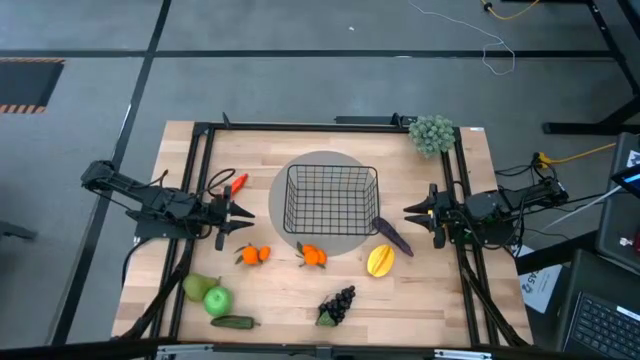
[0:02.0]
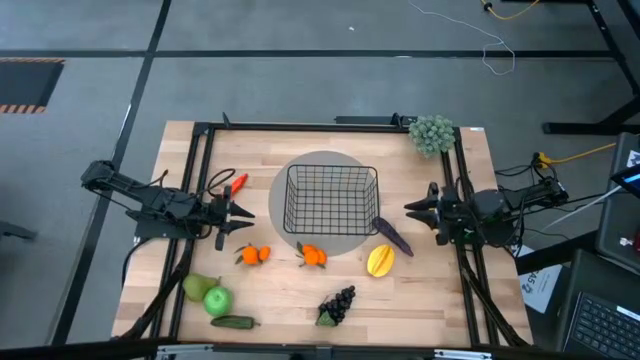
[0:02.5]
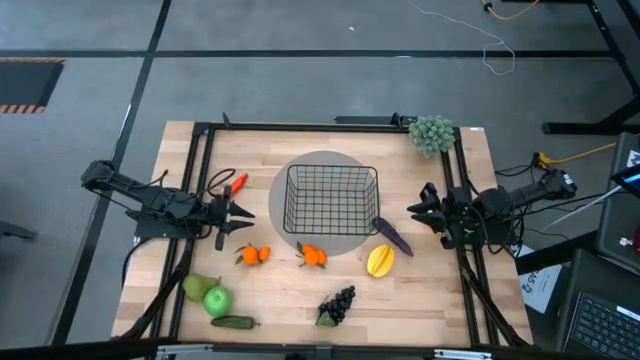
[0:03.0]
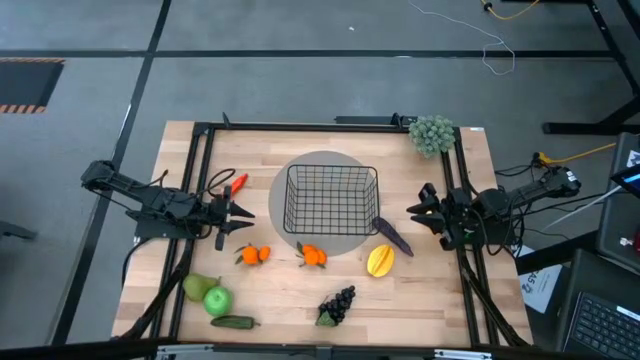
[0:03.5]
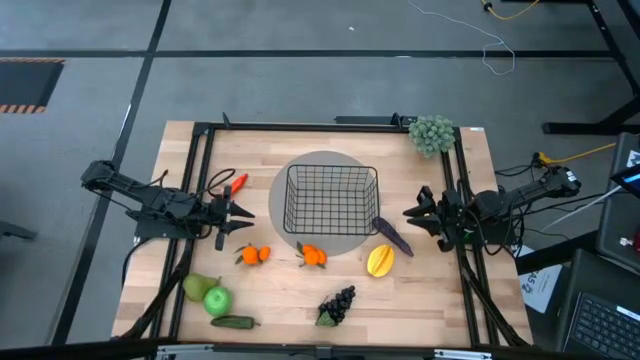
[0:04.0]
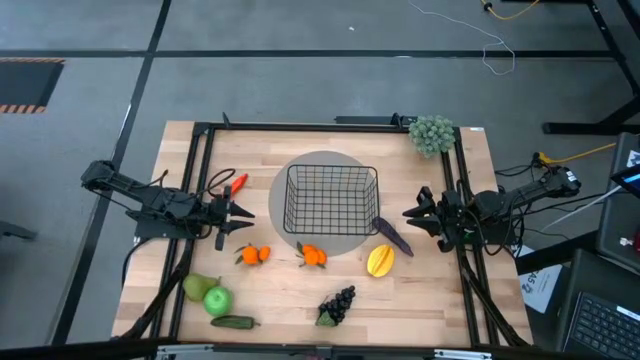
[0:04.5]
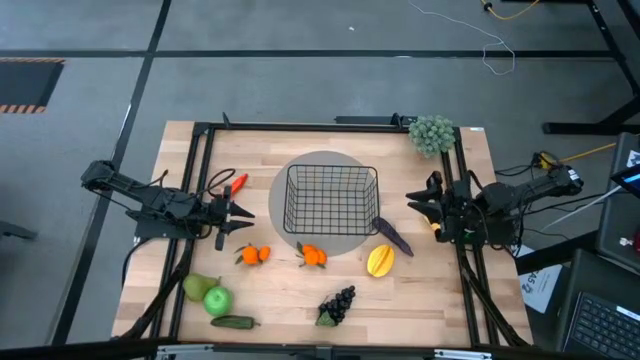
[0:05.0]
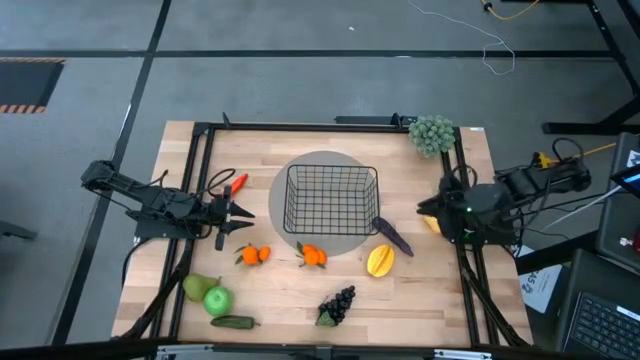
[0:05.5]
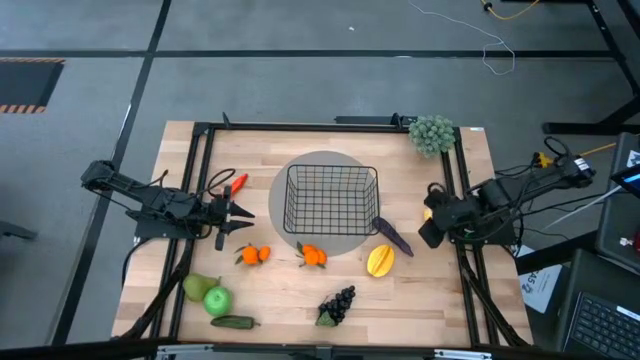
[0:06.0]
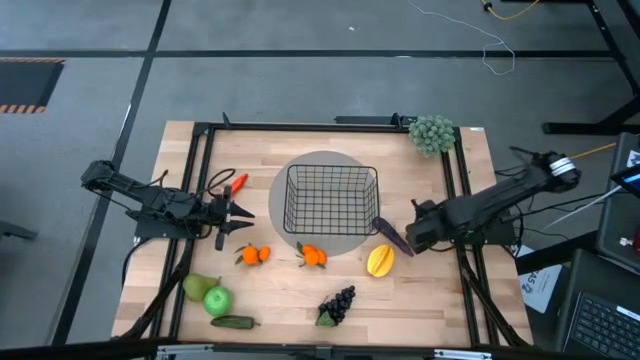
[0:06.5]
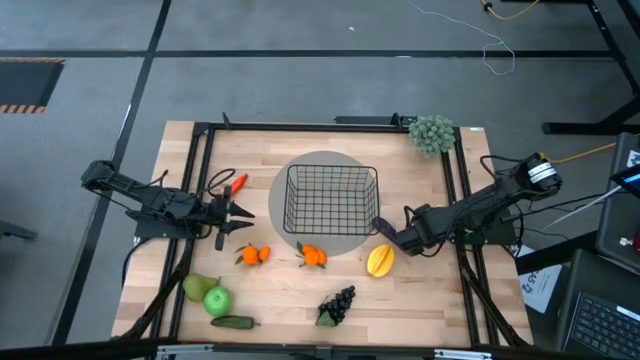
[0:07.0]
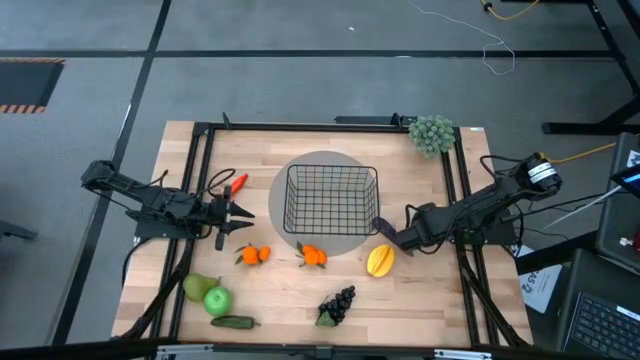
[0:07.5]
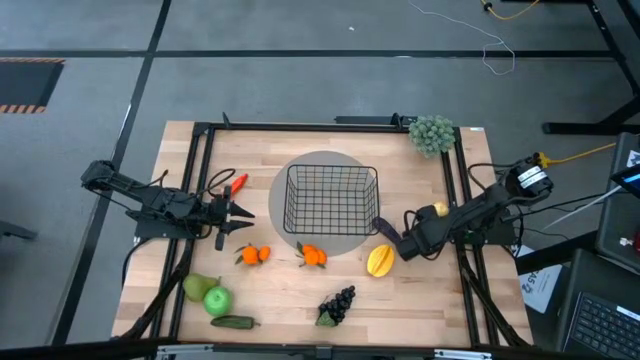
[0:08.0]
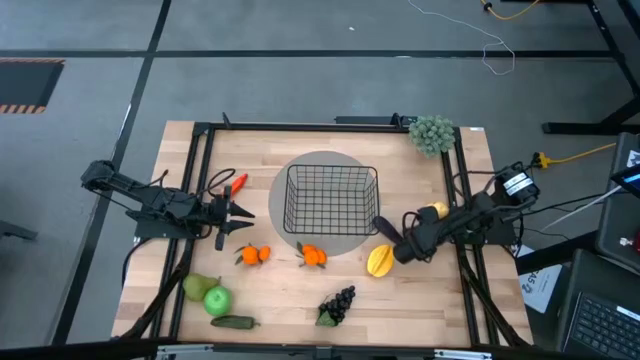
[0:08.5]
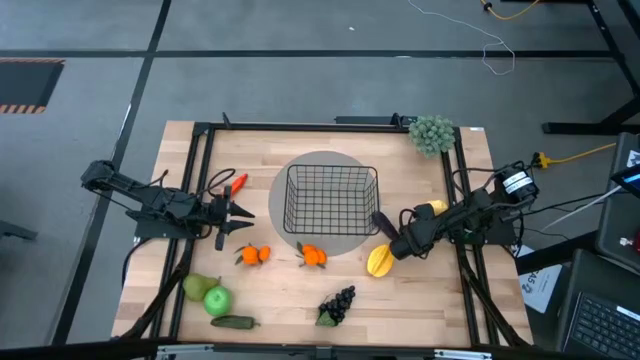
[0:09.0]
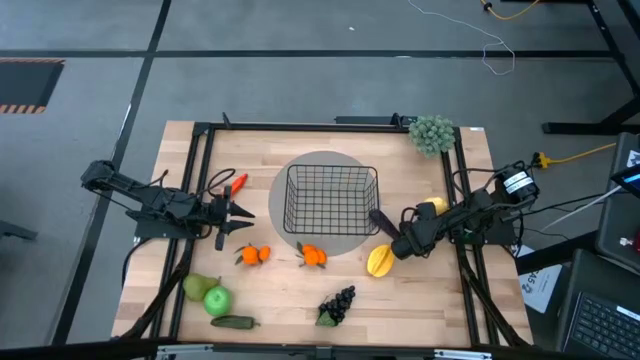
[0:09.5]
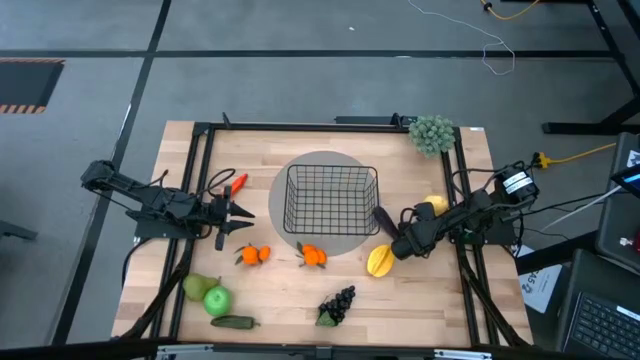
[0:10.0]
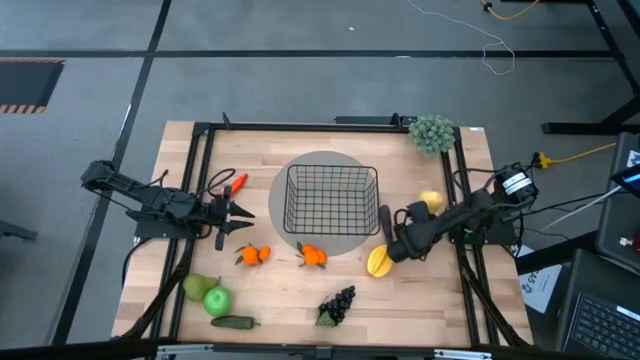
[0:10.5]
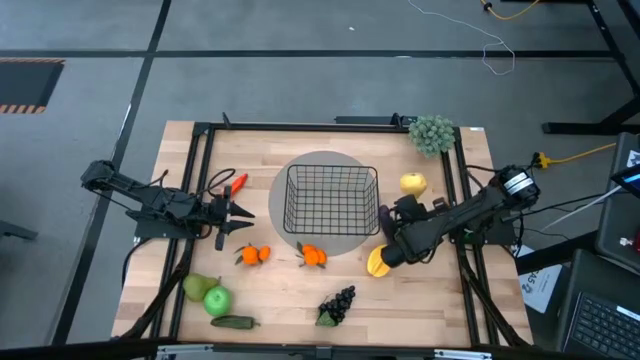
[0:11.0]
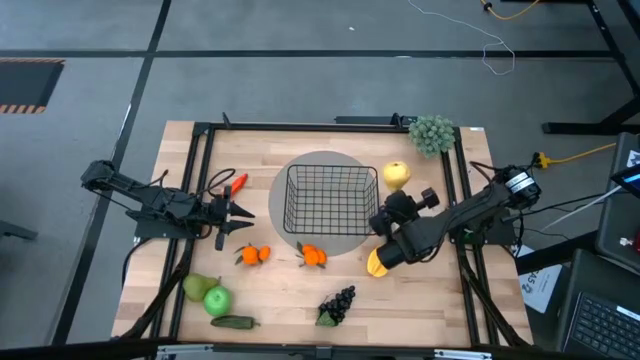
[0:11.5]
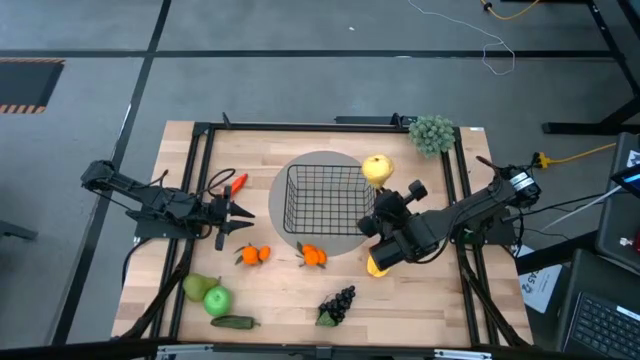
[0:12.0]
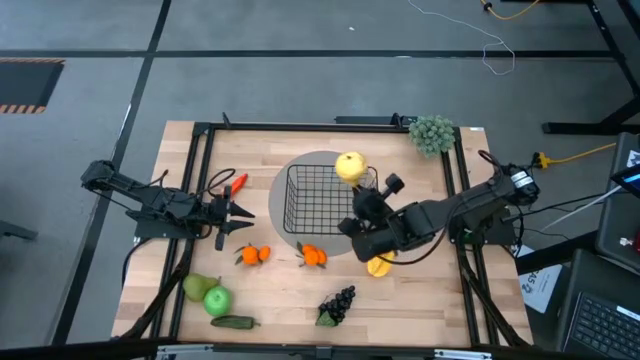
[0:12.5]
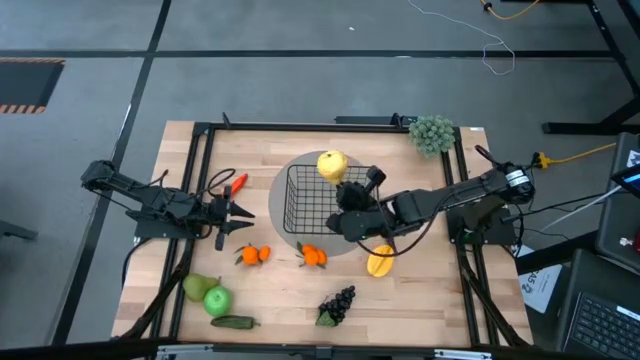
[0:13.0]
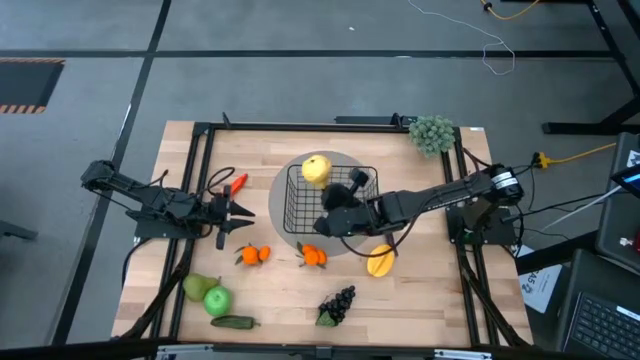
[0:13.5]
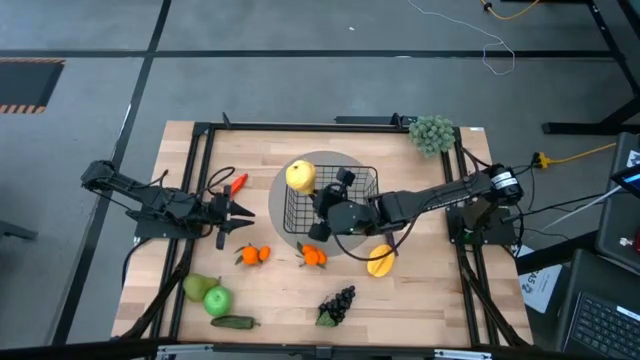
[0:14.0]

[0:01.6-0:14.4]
Task: Build produce basket
Put the yellow pear into the wire basket

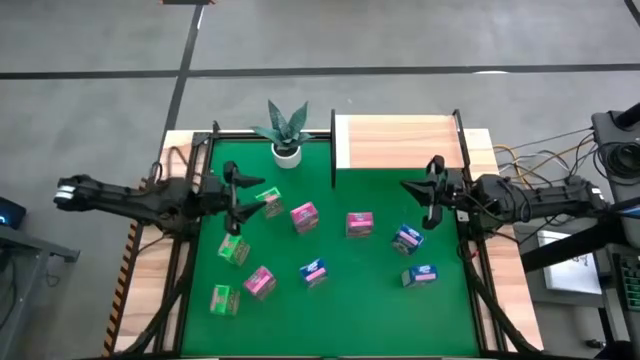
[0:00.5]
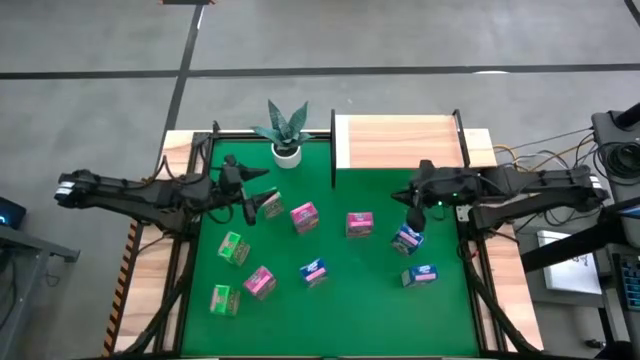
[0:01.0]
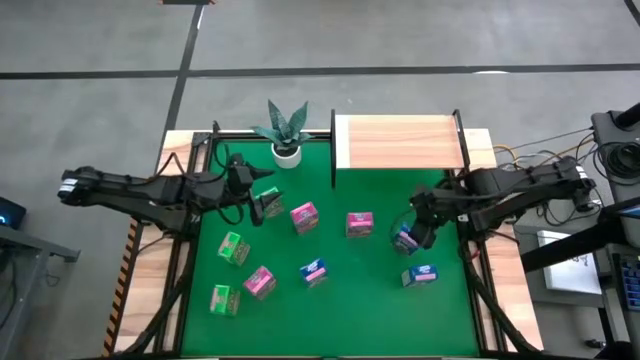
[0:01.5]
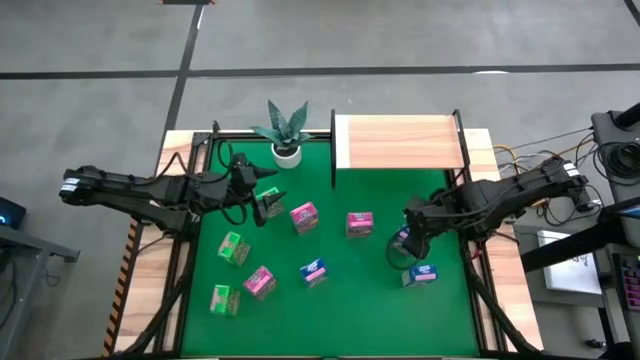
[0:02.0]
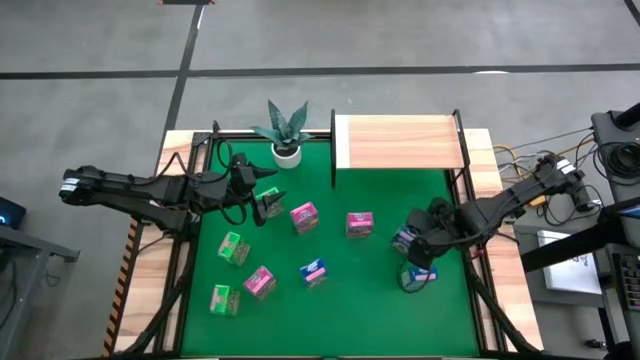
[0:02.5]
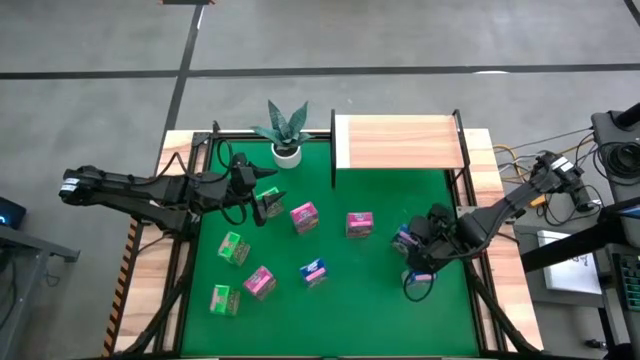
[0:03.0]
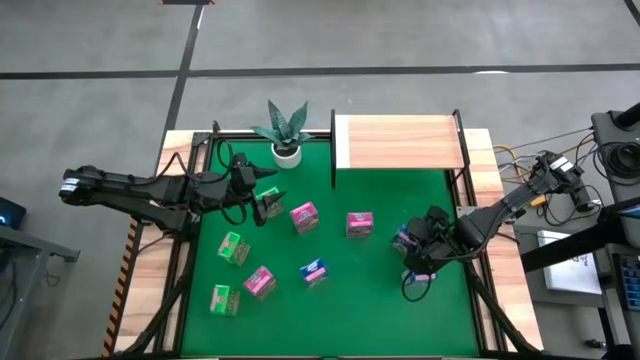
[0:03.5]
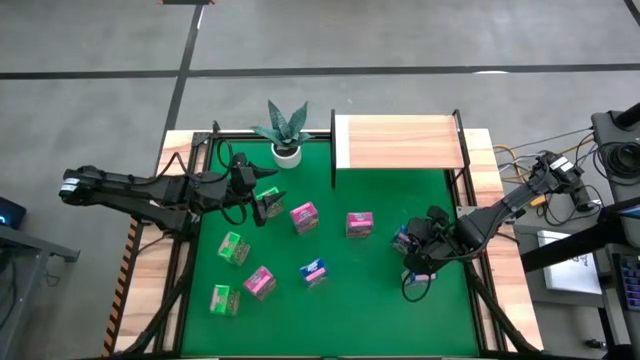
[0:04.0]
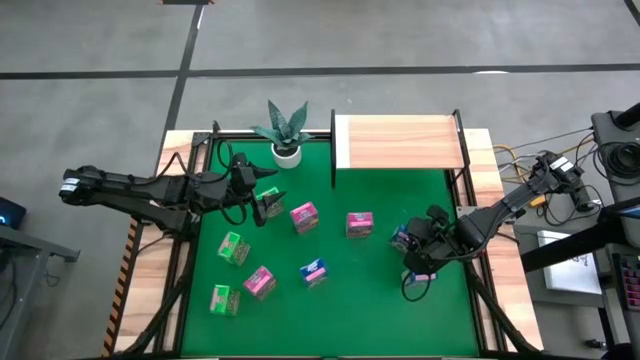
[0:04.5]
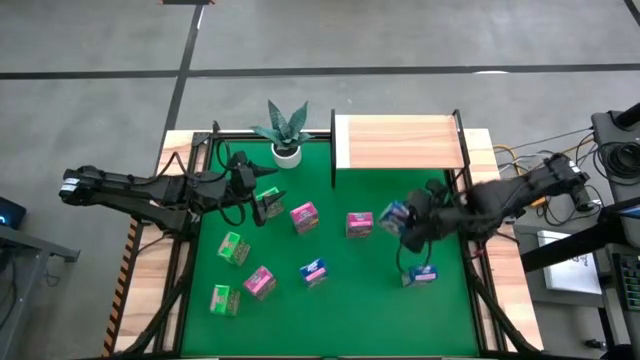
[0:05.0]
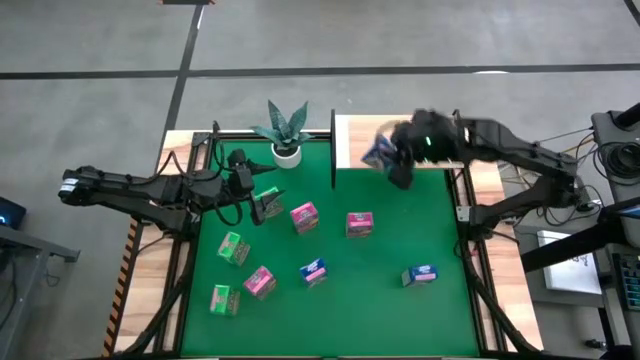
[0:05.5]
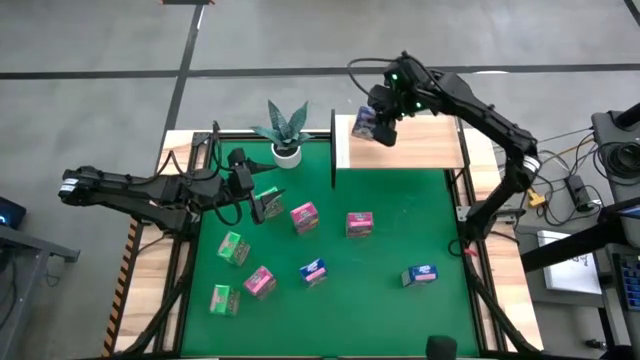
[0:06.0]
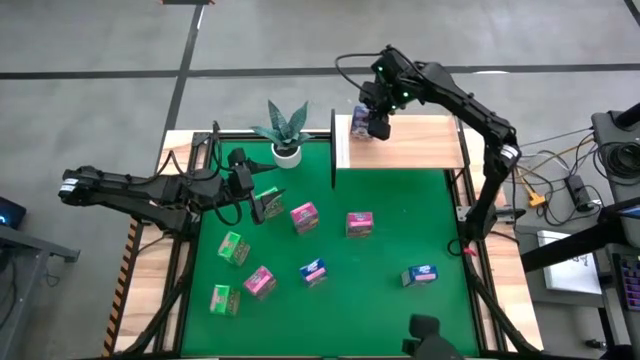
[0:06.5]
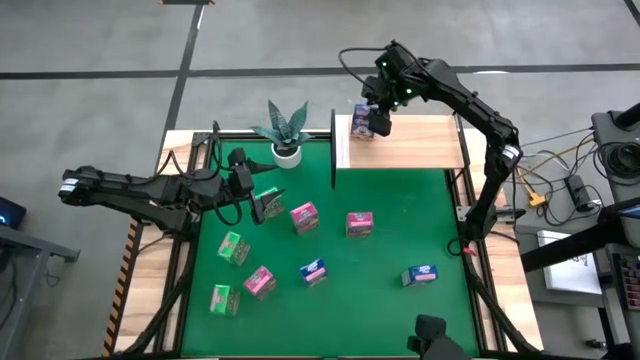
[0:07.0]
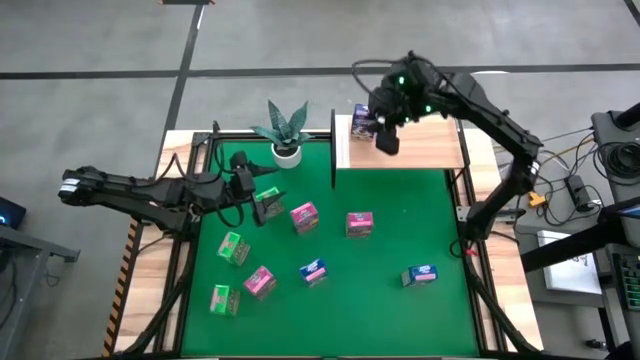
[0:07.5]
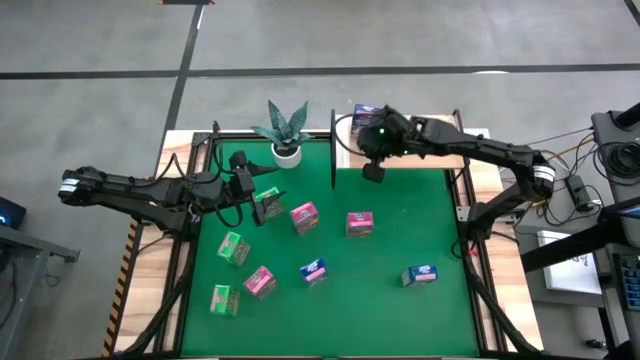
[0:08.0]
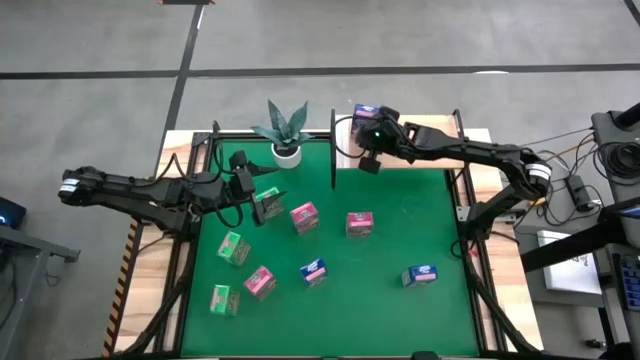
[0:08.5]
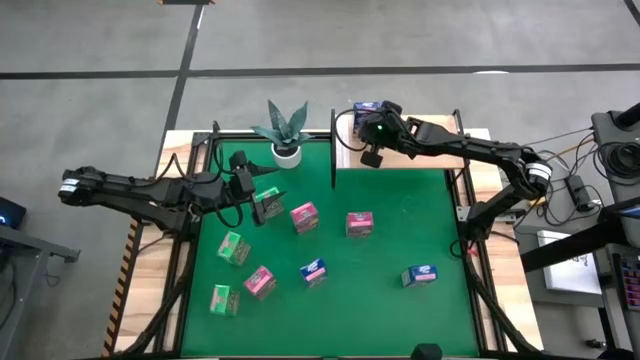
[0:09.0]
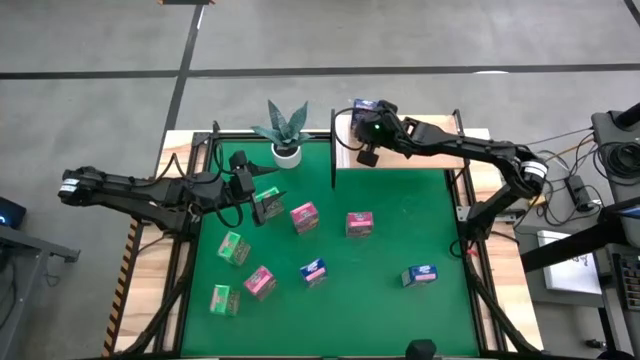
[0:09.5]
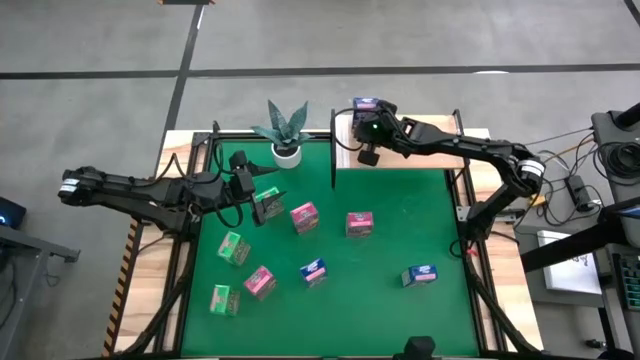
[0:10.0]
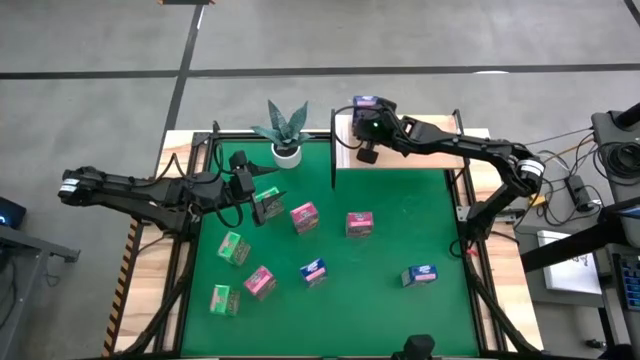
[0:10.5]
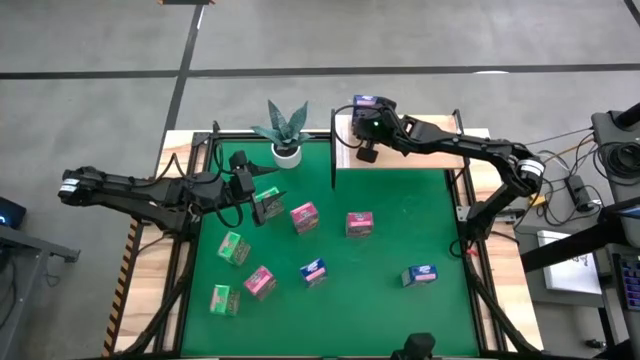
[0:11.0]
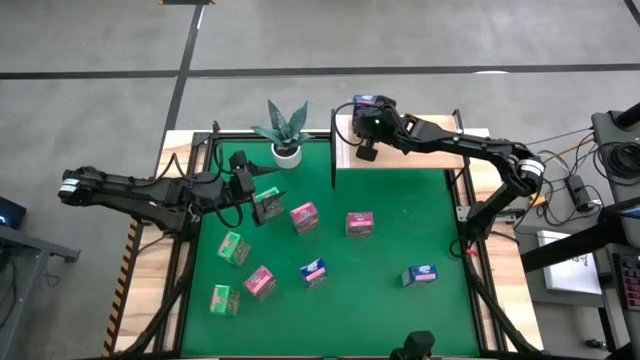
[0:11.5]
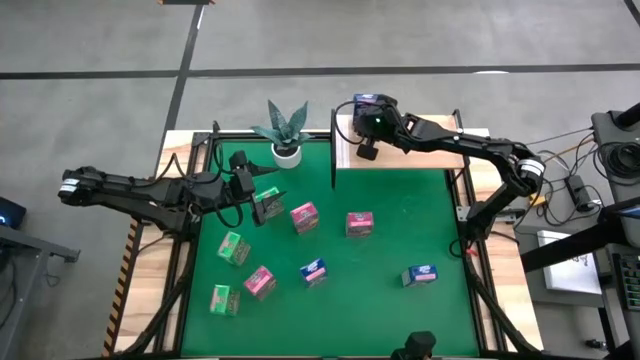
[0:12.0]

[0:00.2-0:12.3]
Task: Stack cereal on shelf
Put the top blue cereal box on the shelf
